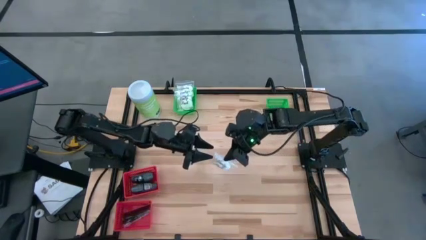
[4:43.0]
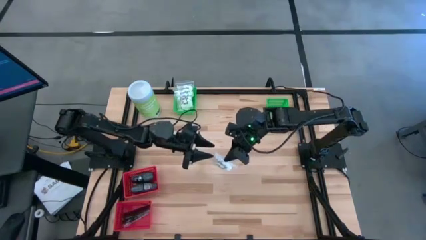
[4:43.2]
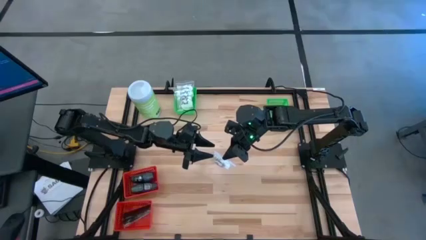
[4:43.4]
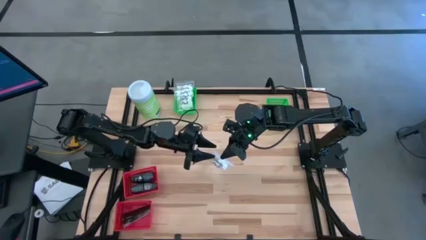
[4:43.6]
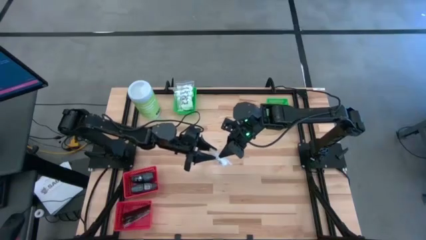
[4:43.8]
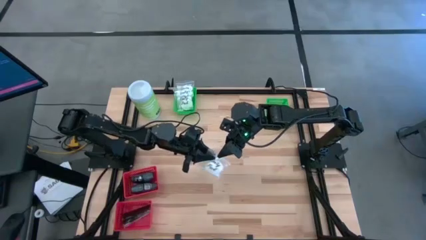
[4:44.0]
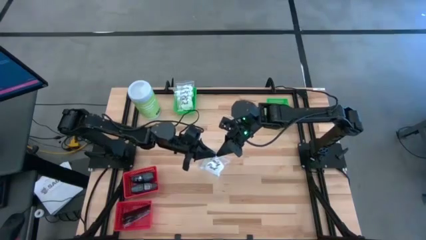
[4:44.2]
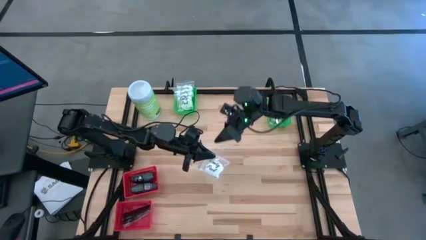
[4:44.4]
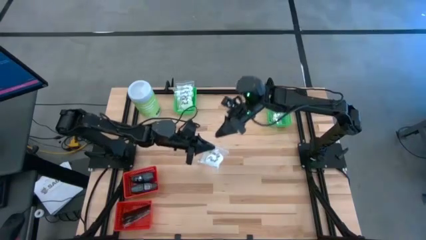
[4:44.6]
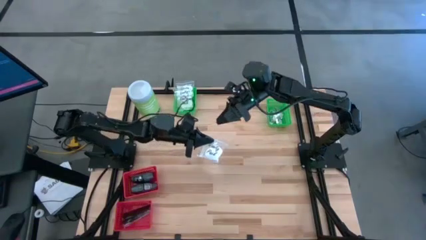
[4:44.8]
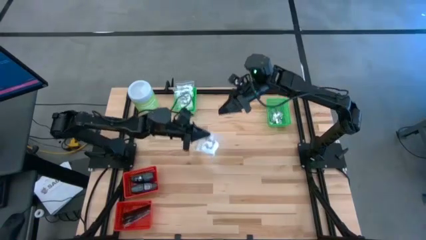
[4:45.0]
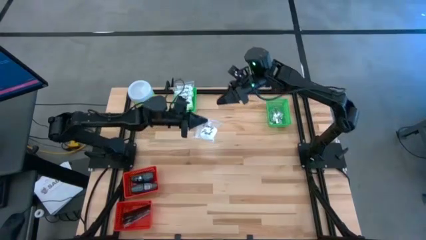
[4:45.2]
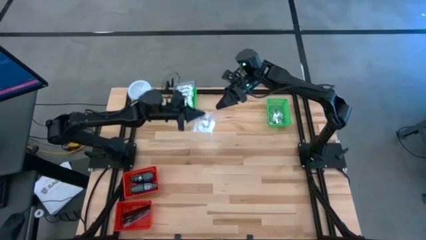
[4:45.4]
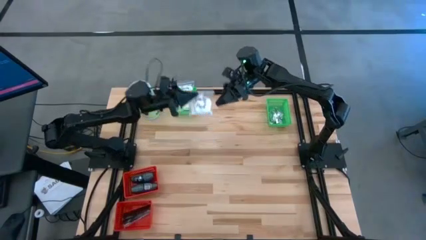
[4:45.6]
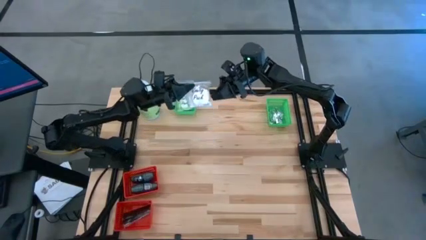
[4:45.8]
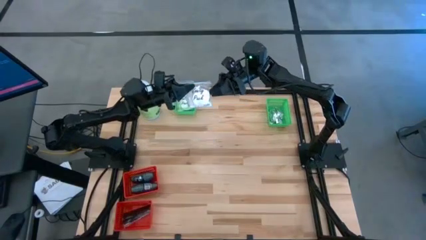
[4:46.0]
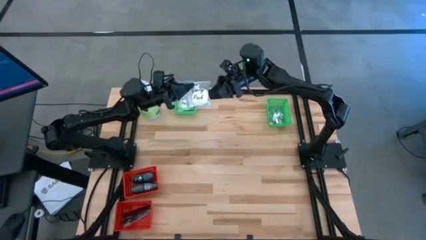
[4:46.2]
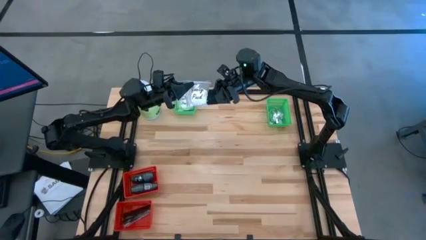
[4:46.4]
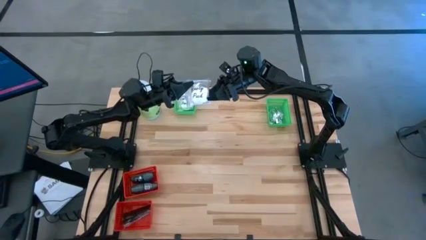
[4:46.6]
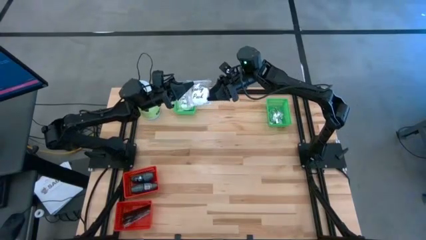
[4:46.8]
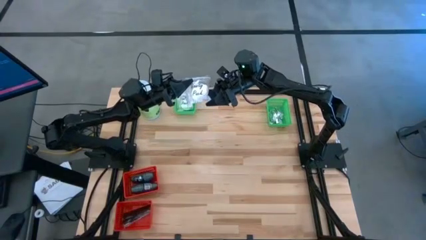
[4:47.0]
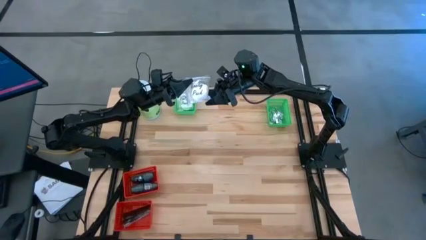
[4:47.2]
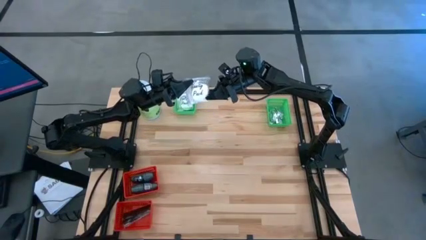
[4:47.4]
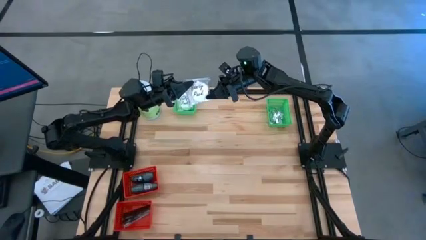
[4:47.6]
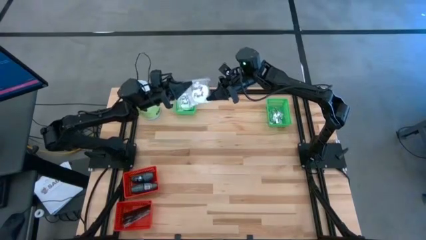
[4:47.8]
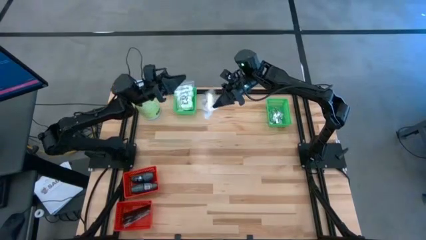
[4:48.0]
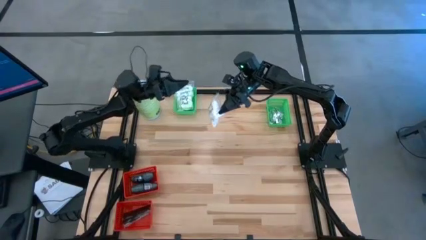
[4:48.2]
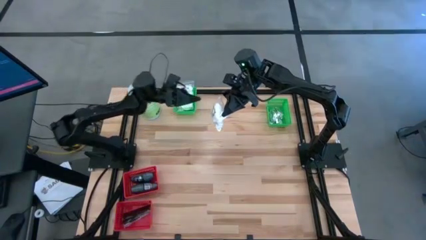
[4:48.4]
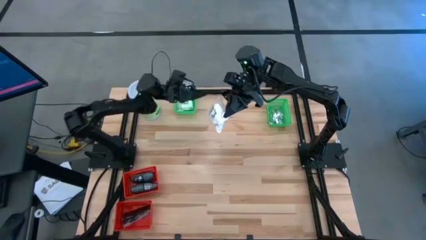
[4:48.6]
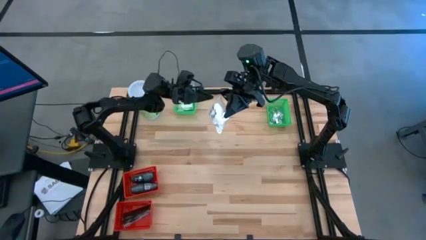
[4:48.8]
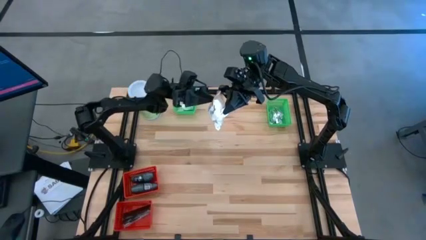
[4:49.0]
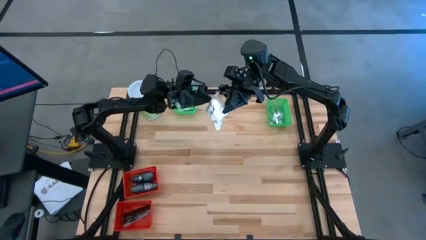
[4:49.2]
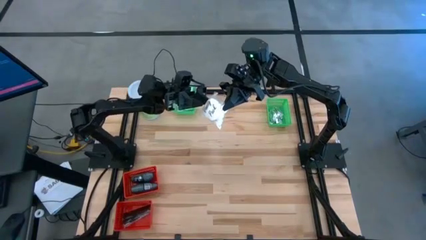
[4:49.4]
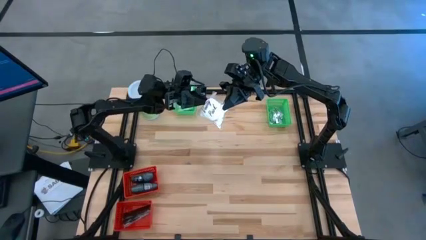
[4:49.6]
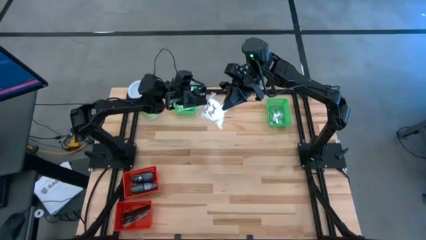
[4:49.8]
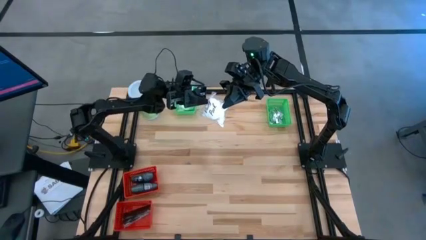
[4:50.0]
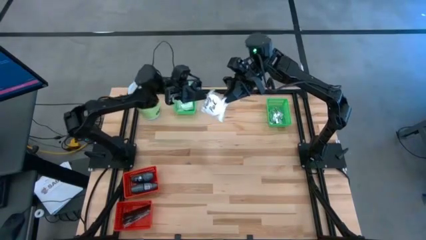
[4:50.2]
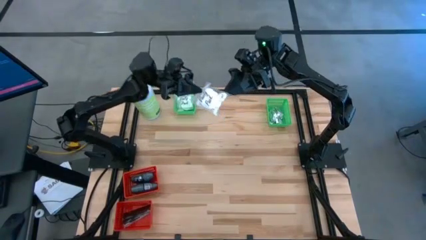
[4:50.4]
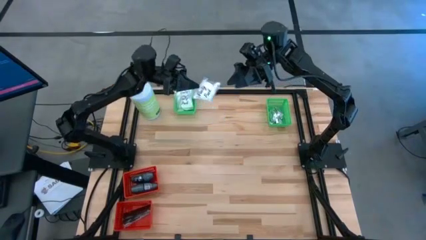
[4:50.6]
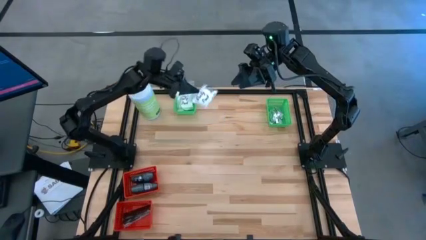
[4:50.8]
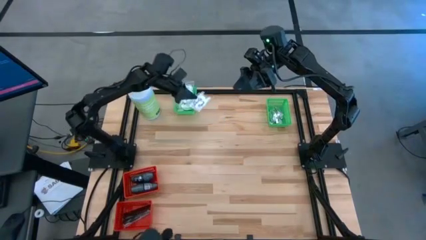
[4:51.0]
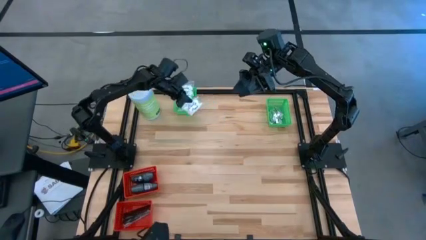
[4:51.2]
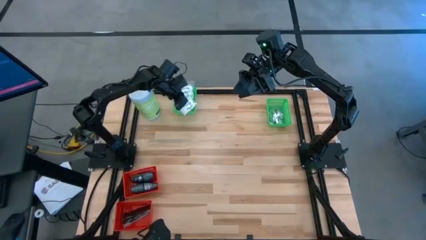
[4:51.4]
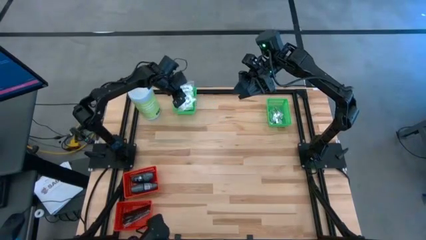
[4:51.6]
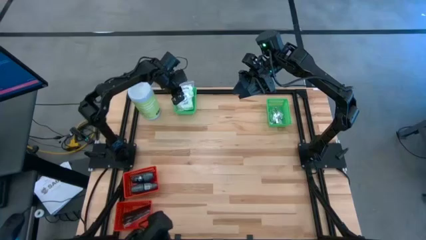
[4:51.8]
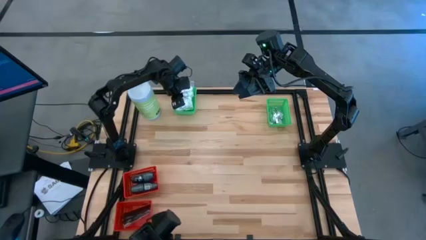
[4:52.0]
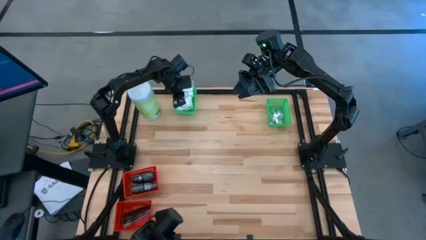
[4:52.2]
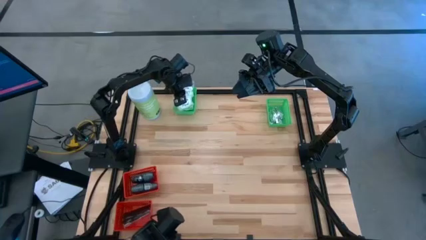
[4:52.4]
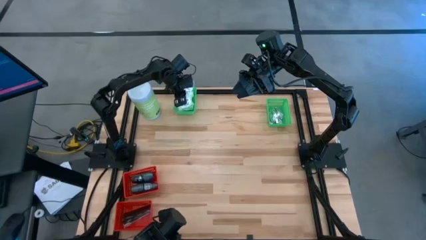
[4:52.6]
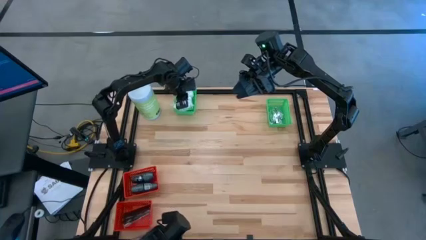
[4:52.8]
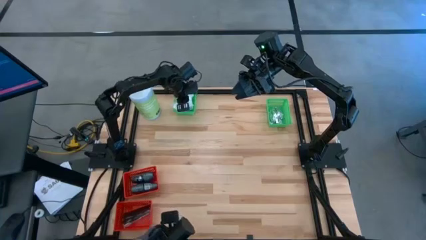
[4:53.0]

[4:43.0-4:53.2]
Task: Pick & Place Travel size toiletries
Put the white vanity pack into the top left green basket

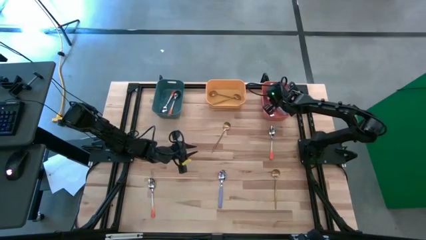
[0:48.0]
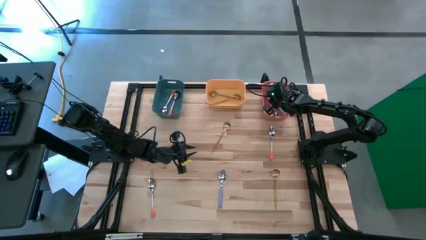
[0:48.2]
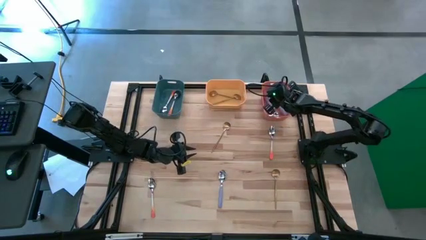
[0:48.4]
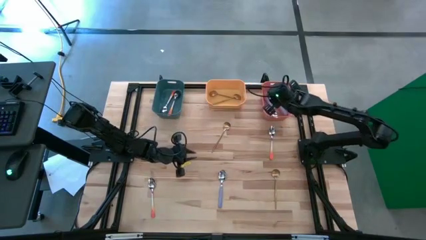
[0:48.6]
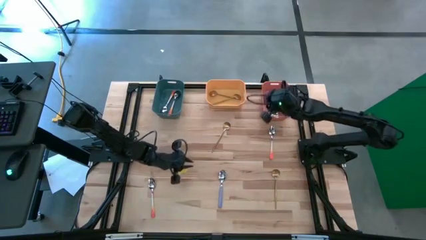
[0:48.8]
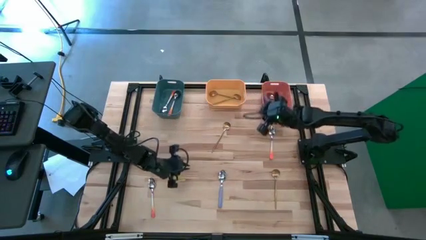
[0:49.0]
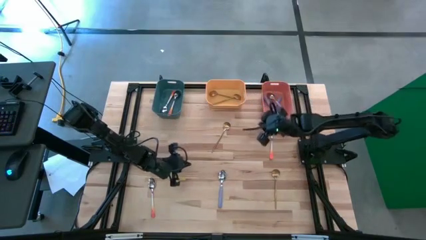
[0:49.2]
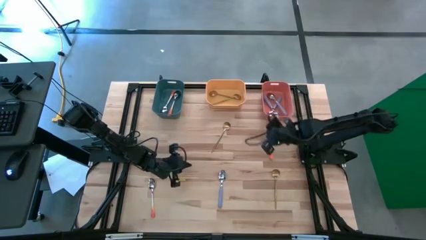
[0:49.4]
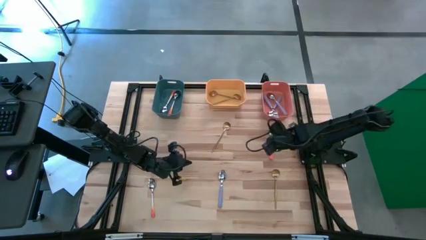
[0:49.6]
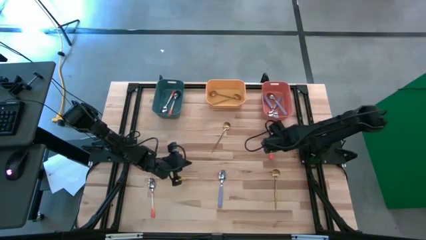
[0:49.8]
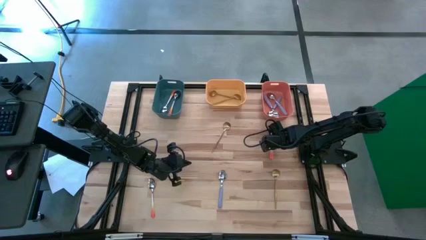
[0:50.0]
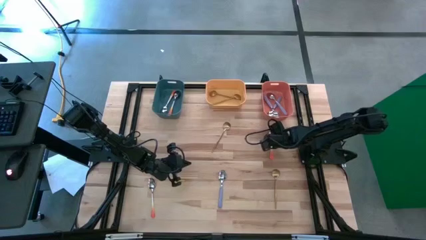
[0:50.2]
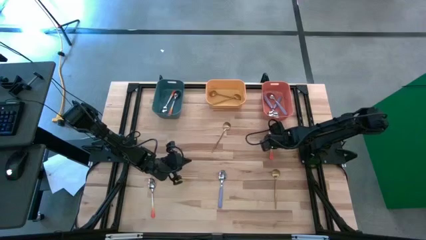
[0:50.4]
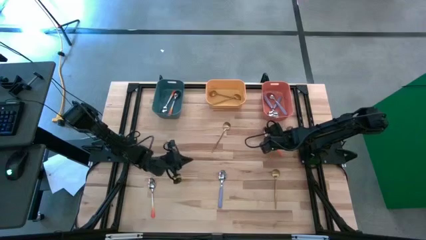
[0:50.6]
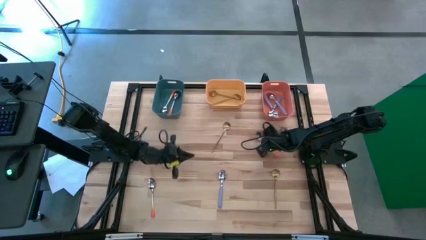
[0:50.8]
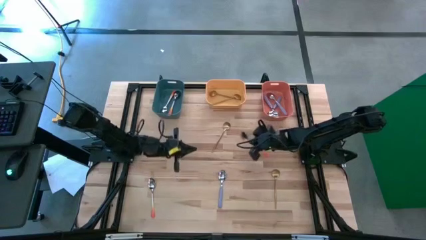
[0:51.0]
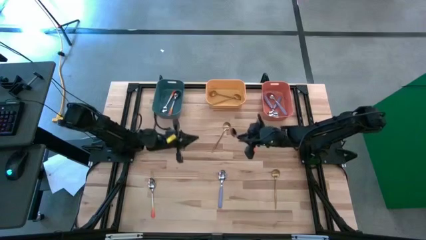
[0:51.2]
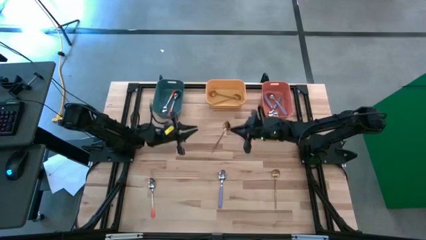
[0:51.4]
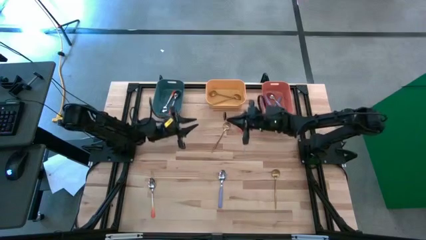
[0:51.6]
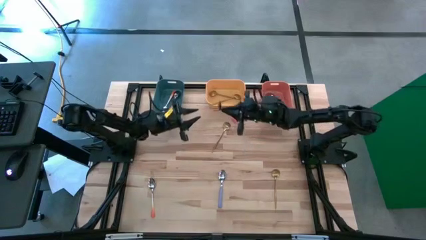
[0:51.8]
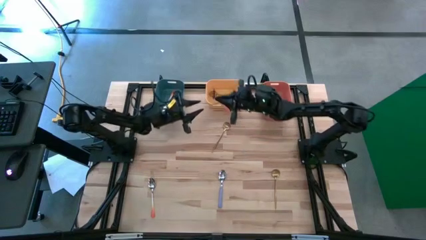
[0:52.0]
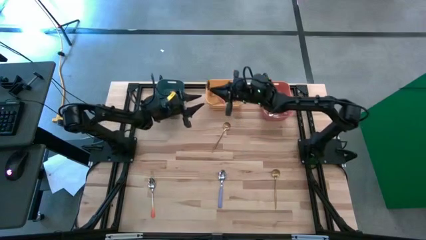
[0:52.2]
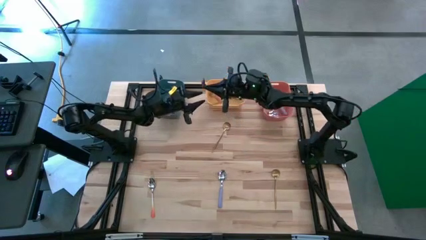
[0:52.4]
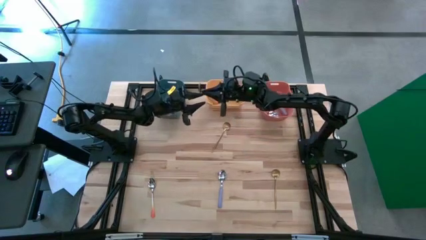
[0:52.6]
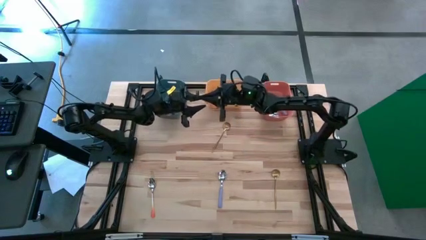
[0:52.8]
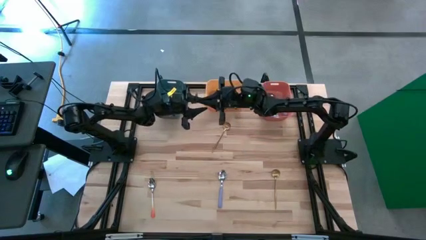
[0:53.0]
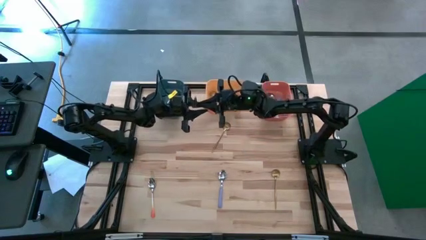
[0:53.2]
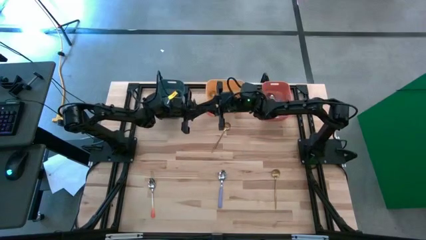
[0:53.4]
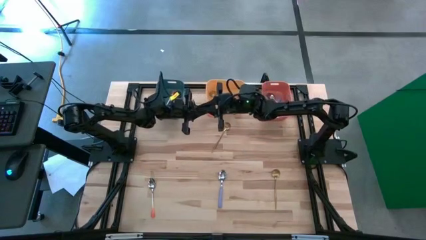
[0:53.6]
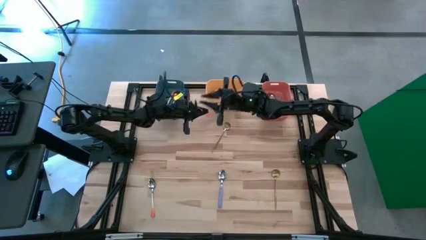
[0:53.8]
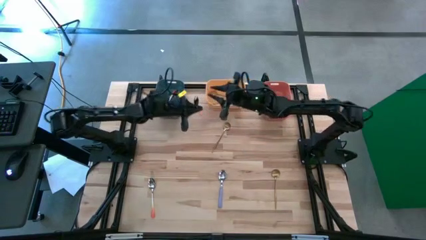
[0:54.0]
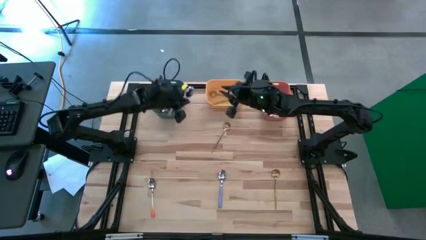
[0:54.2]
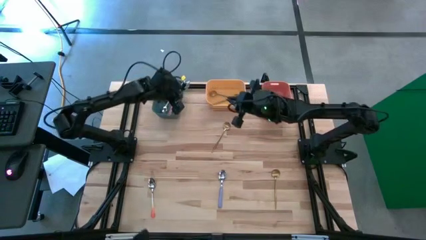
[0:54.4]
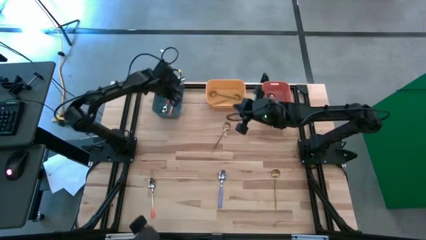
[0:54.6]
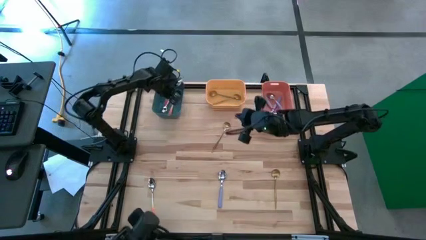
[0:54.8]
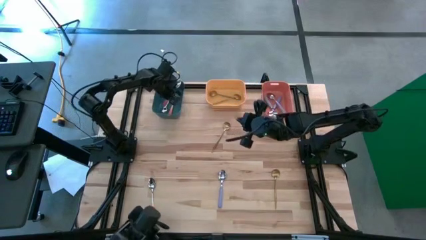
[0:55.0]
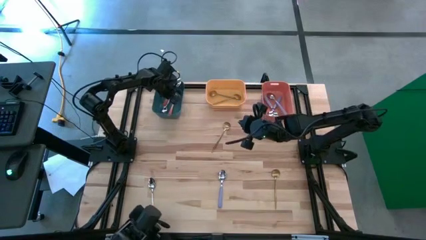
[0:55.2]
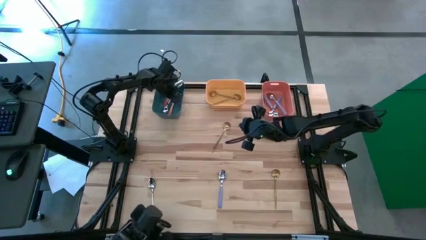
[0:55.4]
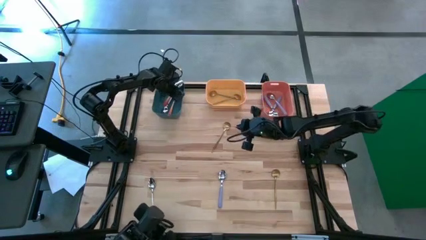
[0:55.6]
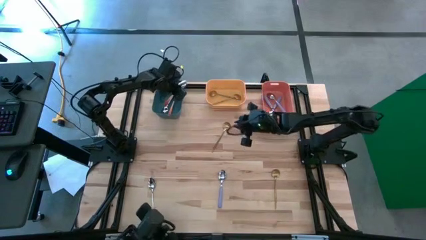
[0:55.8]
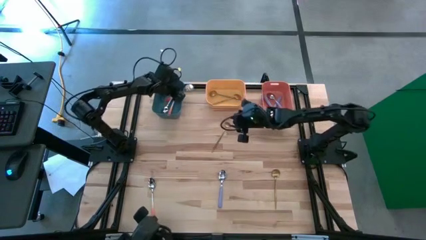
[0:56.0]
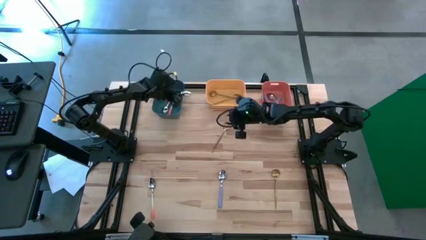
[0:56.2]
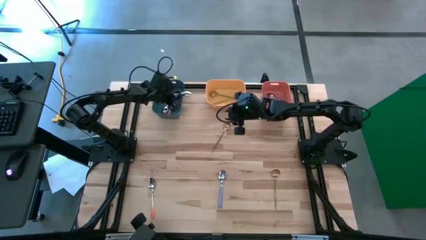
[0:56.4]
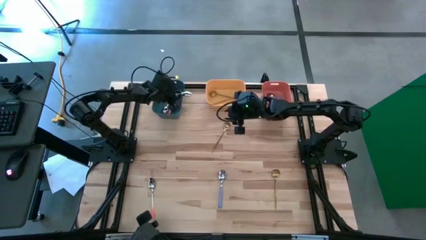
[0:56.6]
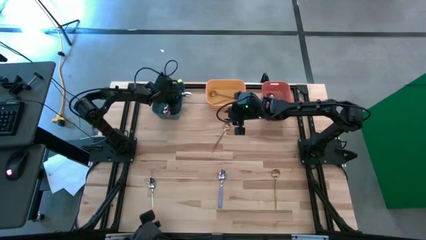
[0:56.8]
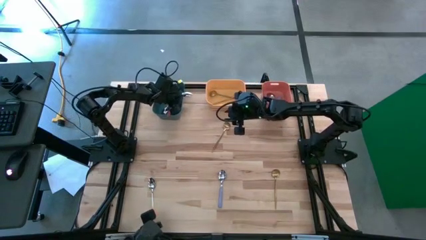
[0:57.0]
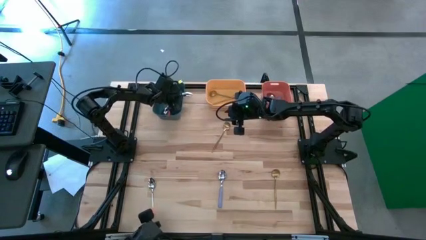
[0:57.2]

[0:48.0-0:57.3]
Task: Sort silverware by color (type)
Put the right orange spoon into the blue bin
